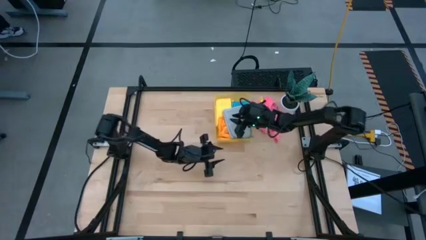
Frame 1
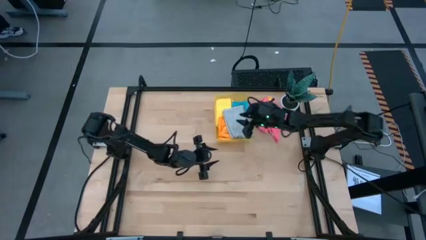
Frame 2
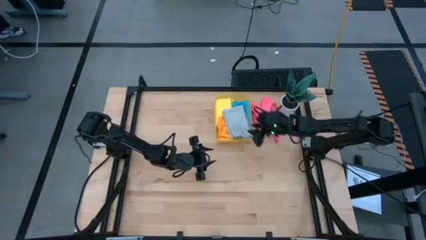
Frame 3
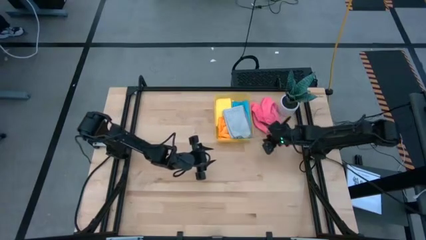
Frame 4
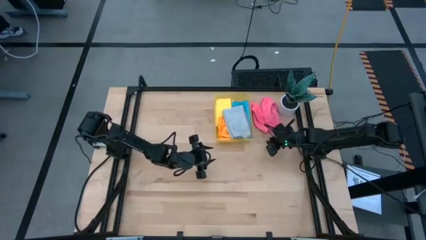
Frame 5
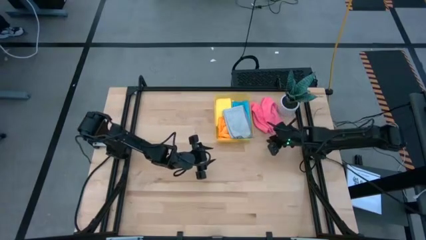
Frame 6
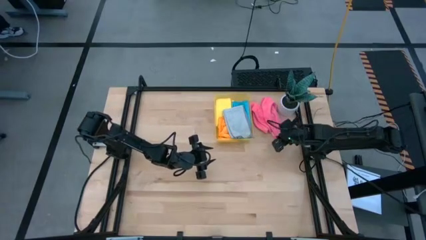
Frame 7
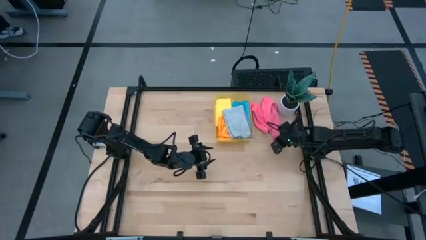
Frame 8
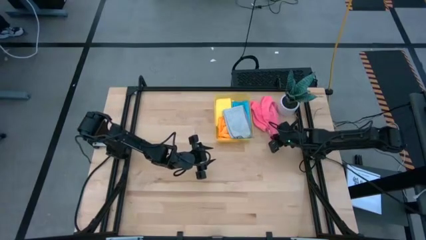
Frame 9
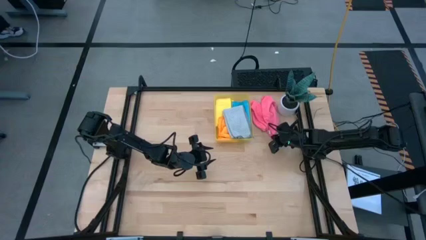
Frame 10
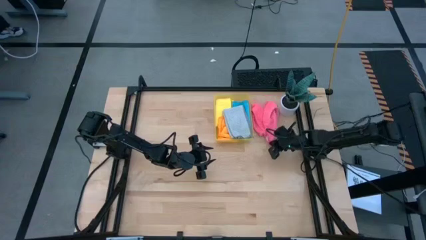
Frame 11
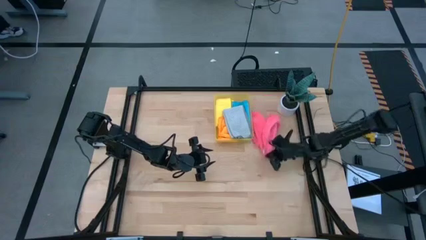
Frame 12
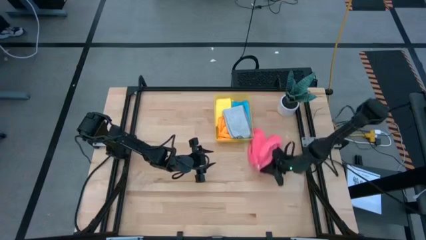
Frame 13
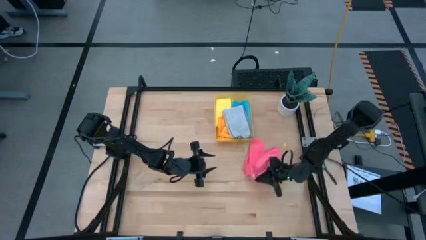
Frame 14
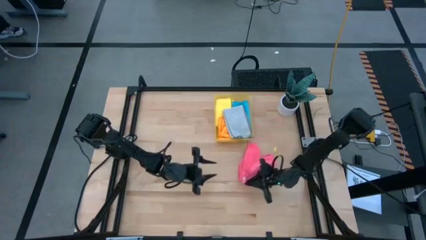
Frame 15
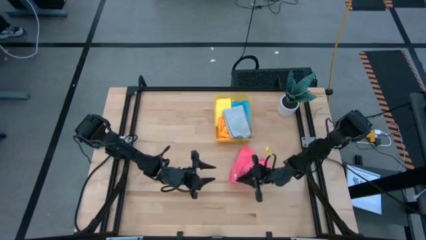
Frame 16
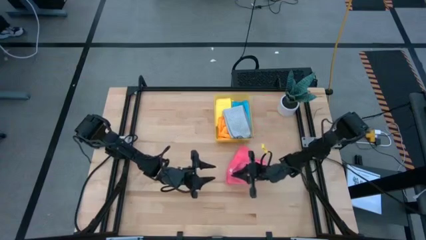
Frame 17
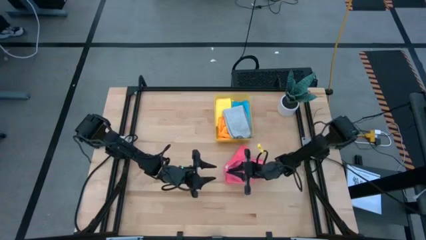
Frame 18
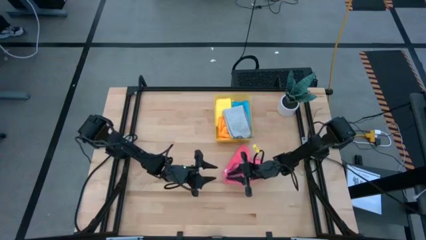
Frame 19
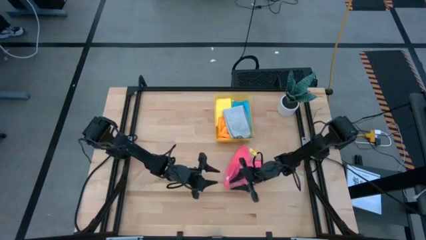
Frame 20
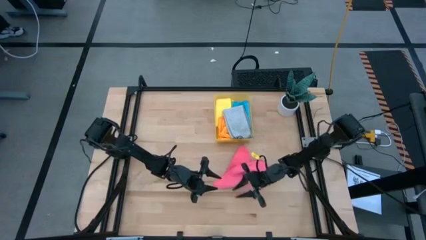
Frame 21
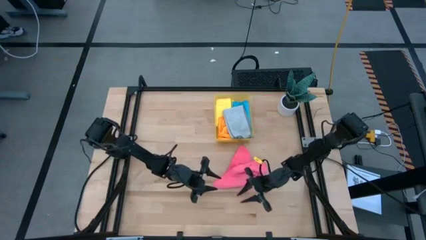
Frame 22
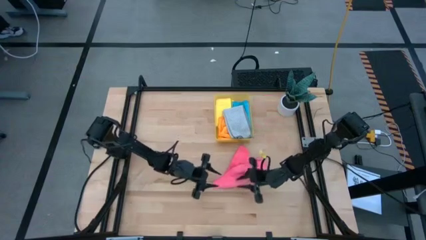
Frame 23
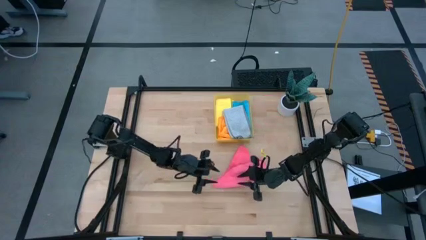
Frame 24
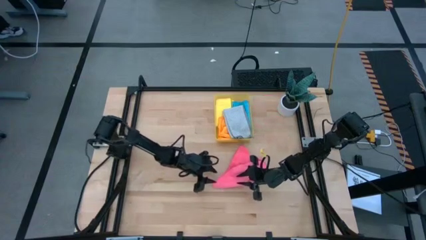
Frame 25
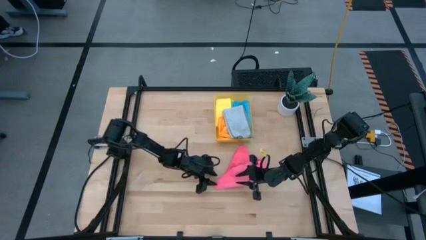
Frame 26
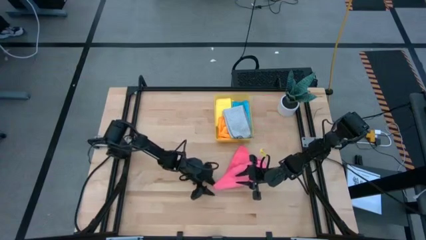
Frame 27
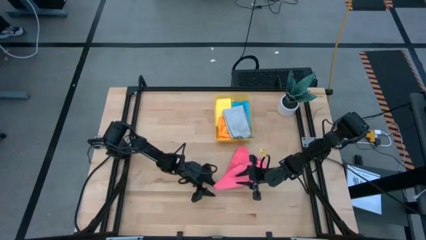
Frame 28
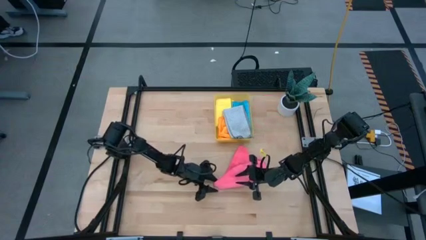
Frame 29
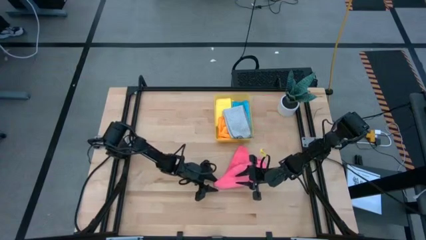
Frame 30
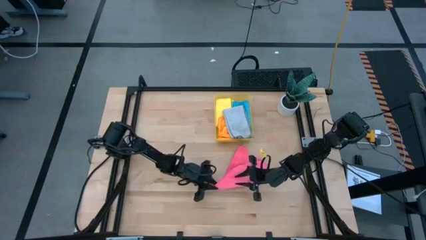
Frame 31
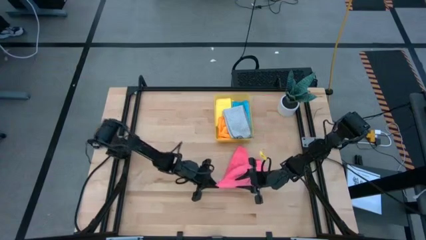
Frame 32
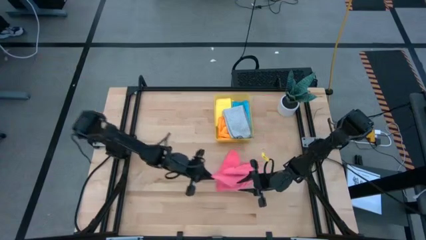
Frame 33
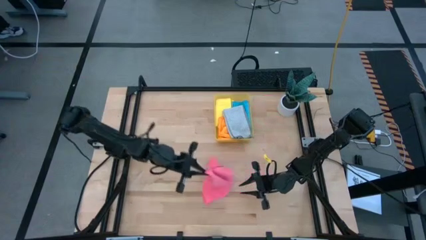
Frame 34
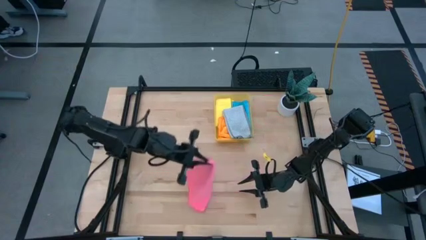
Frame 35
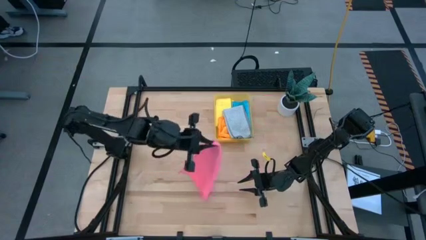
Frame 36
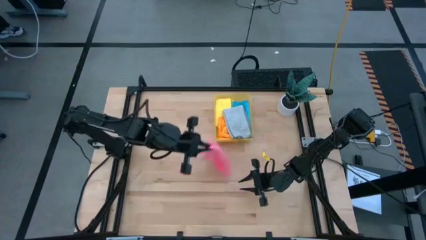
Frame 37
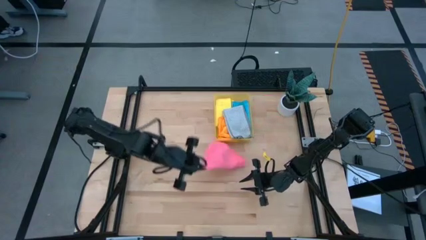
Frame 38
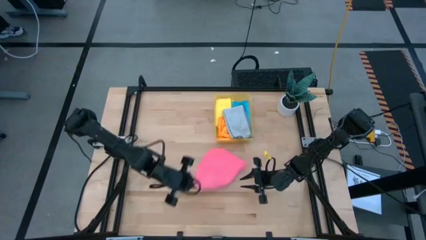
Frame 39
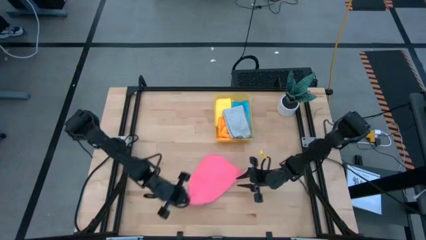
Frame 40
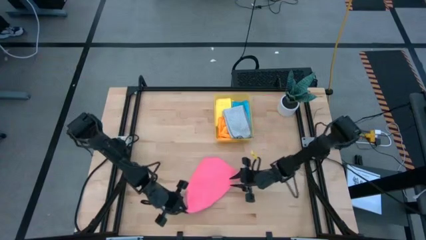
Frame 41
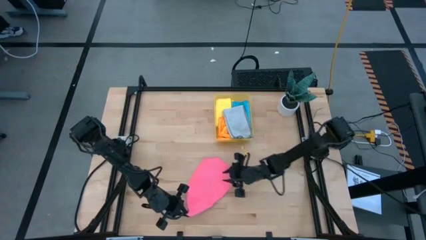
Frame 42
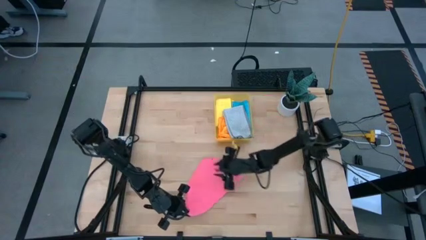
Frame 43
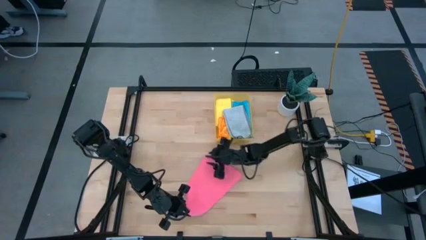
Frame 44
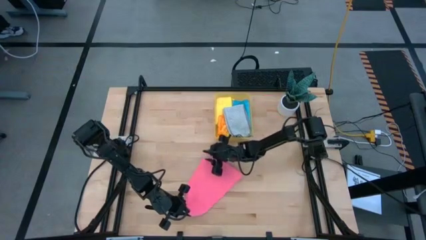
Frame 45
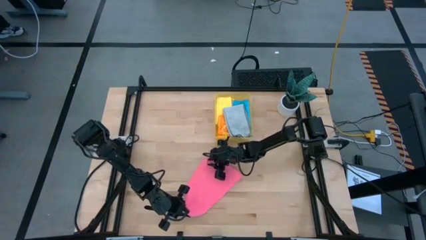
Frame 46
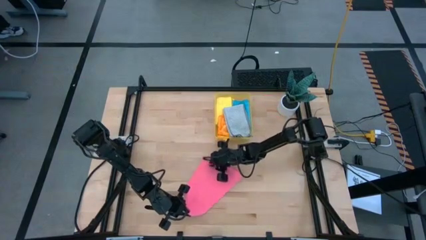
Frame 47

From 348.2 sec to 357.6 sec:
Task: Fold microfiber towels
Fold the pink microfiber towel

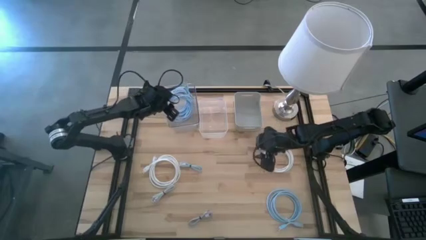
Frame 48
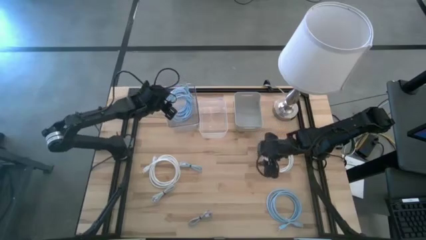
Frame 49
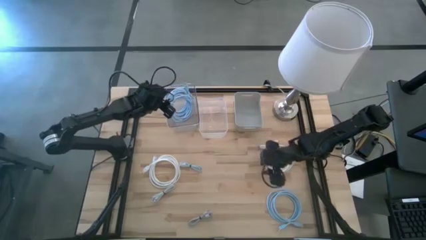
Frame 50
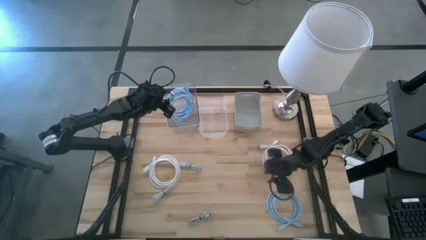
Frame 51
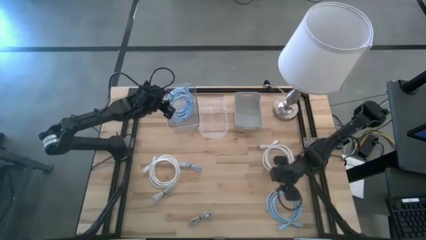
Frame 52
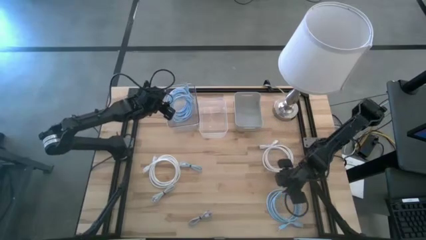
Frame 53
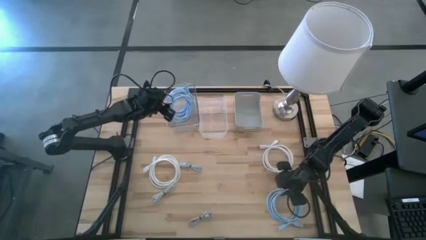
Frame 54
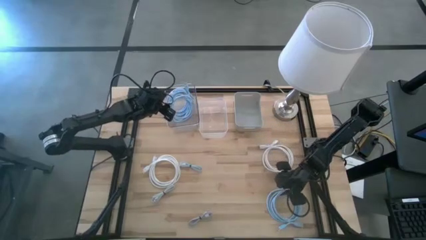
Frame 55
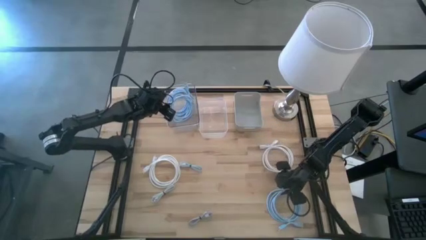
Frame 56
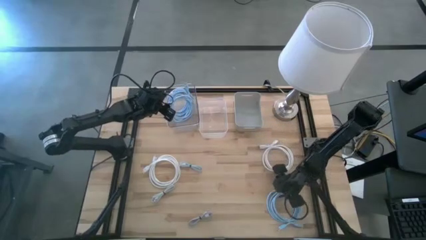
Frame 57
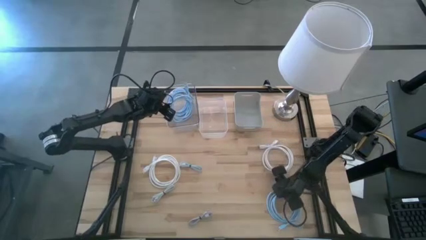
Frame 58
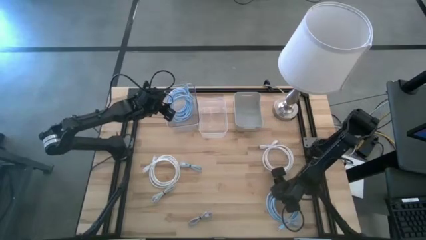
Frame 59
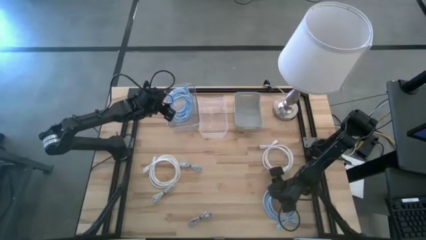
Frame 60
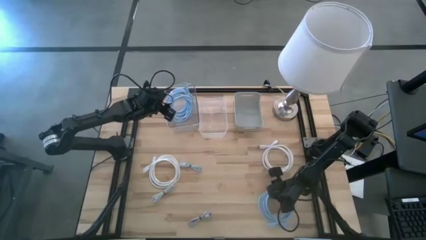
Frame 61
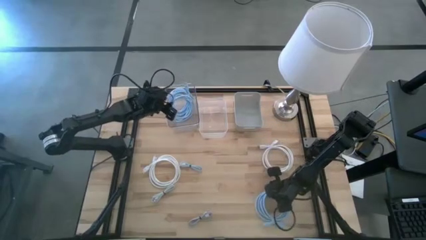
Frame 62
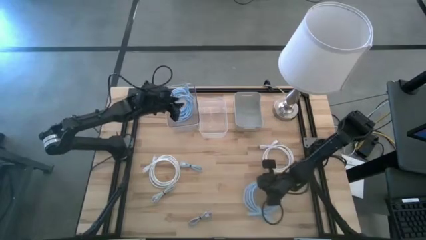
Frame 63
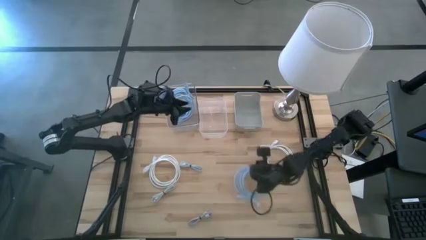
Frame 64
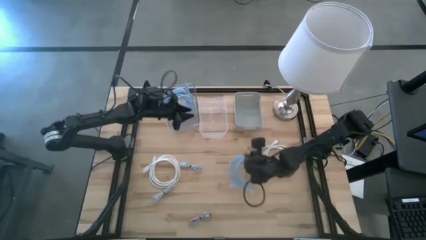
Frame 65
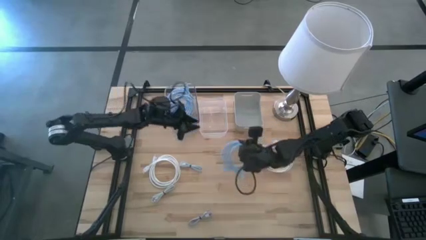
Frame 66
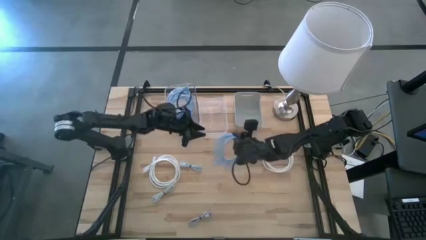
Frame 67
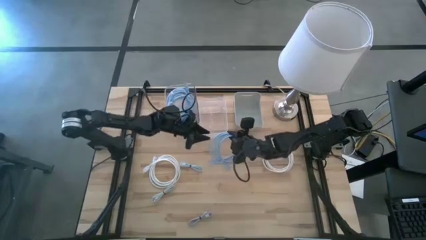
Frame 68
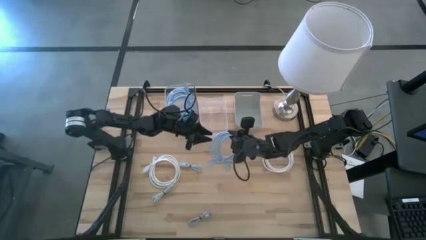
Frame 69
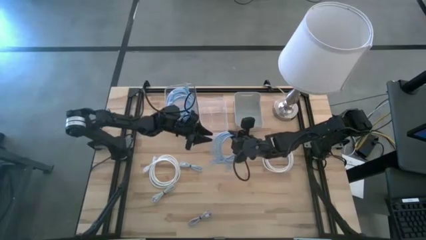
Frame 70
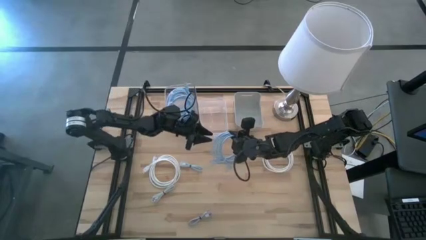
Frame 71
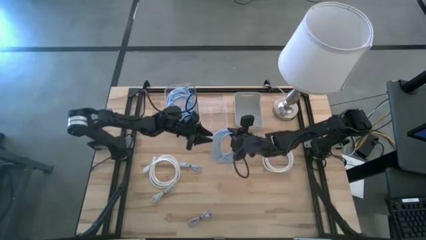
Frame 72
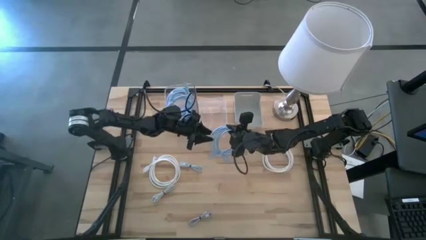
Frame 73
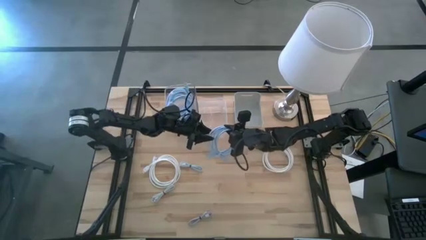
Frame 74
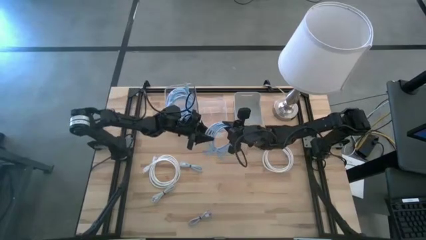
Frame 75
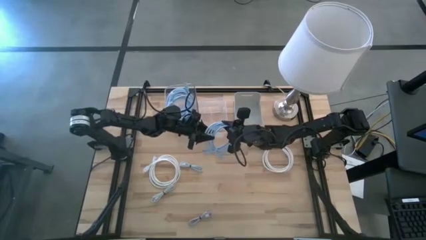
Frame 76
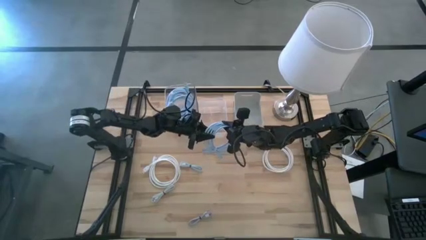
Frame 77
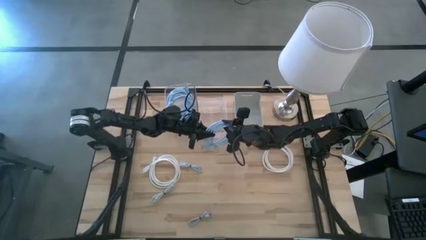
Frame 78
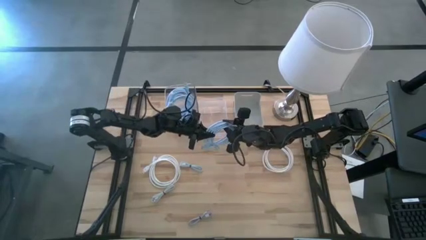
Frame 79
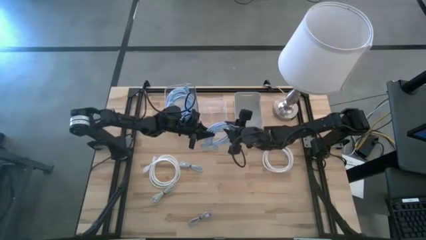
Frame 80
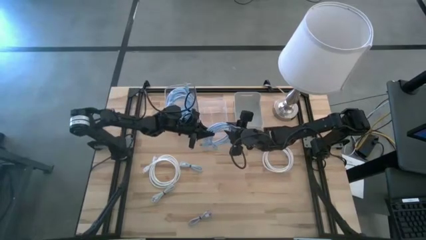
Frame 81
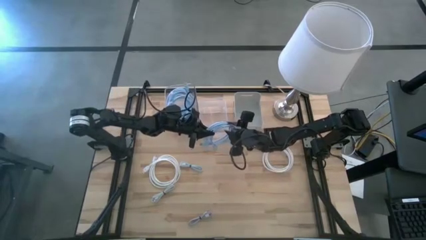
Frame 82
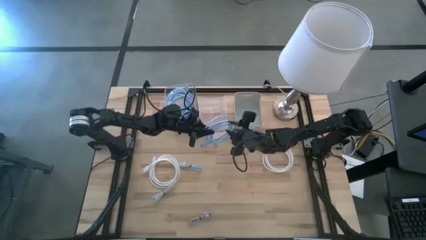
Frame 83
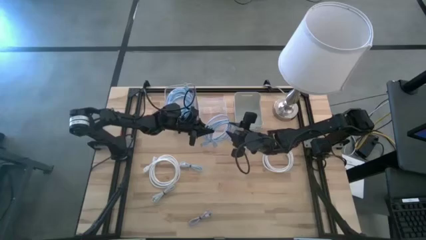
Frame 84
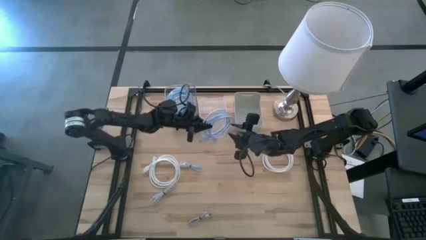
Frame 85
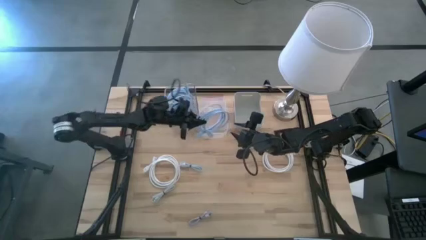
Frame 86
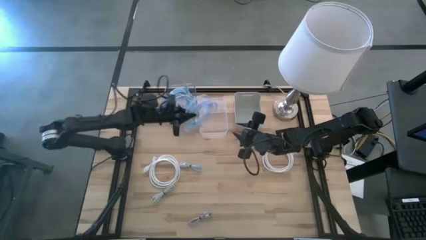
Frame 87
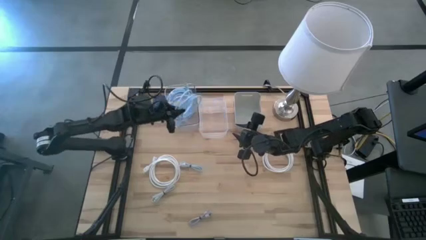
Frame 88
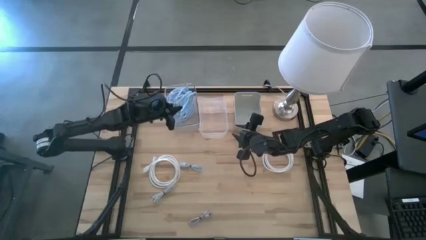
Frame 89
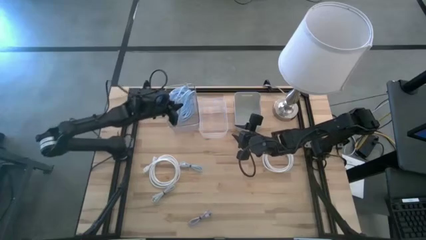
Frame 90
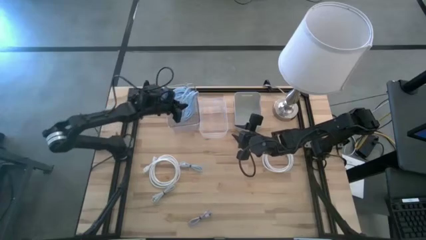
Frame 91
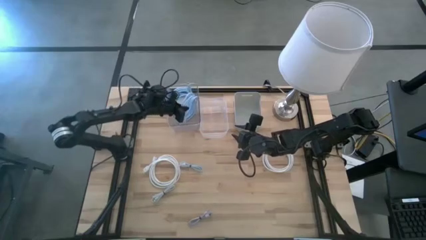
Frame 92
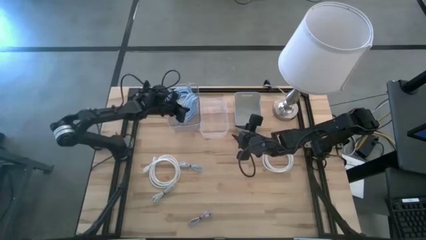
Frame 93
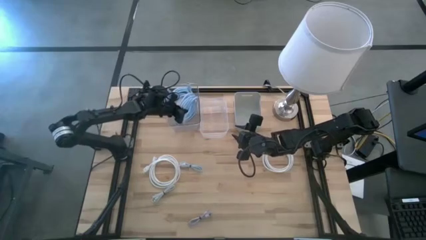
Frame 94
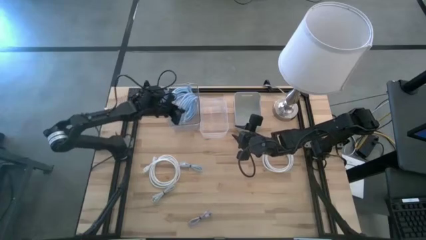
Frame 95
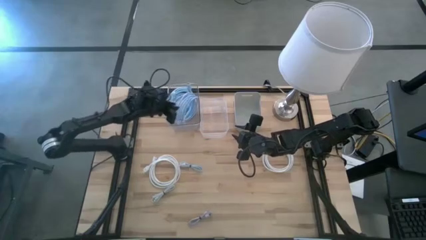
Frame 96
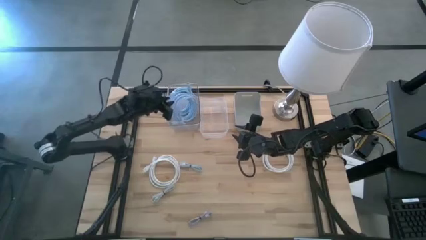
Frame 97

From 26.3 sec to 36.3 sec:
Task: Pick & Place USB Port
Put the blue hdmi cable into the left transparent bin
